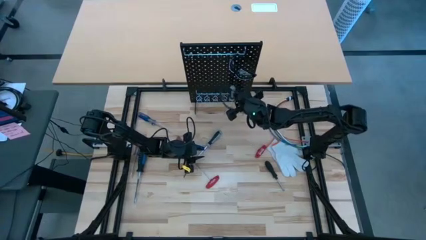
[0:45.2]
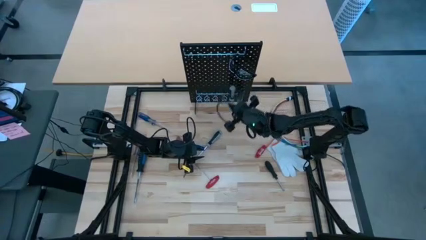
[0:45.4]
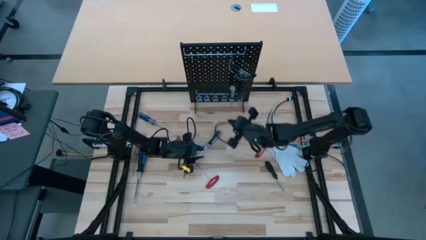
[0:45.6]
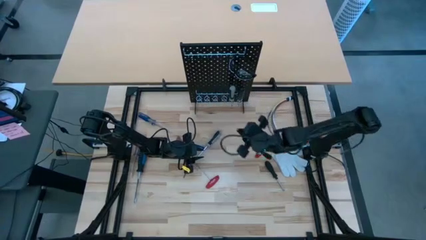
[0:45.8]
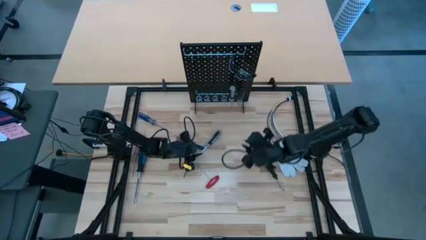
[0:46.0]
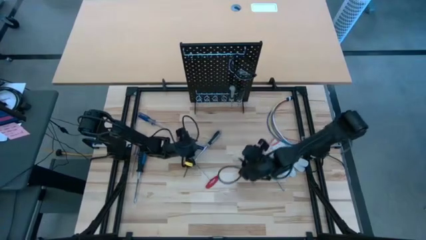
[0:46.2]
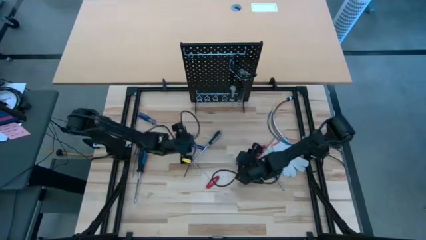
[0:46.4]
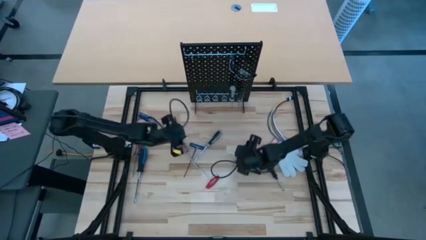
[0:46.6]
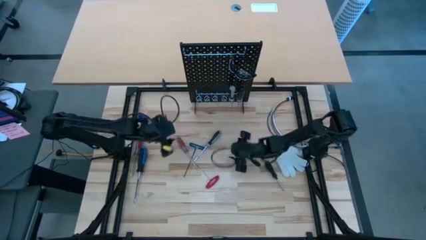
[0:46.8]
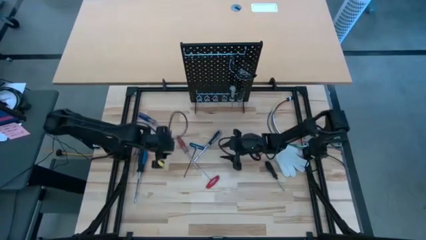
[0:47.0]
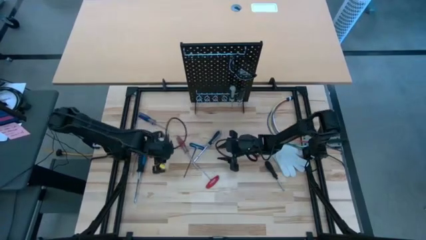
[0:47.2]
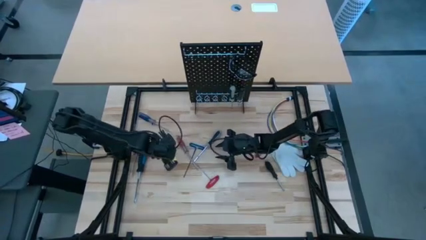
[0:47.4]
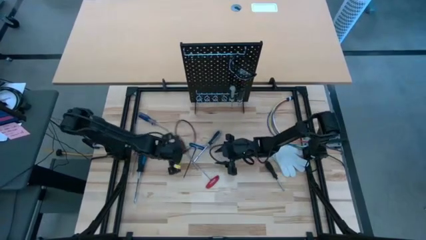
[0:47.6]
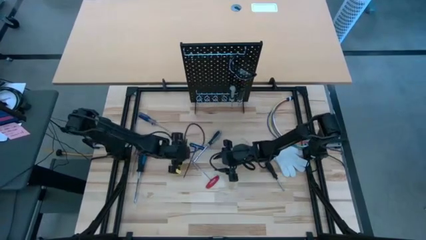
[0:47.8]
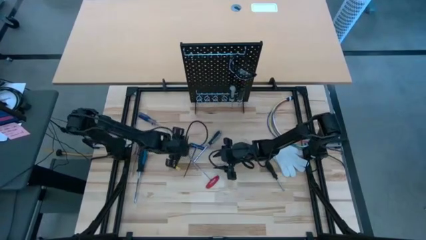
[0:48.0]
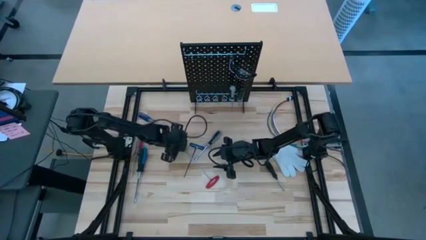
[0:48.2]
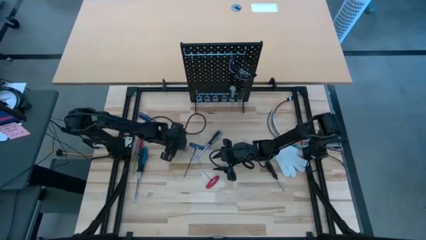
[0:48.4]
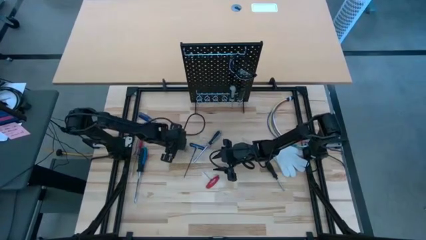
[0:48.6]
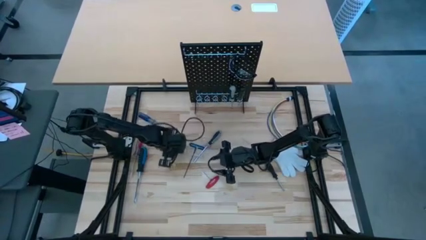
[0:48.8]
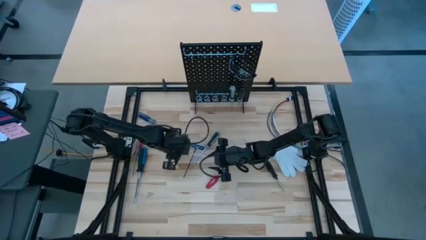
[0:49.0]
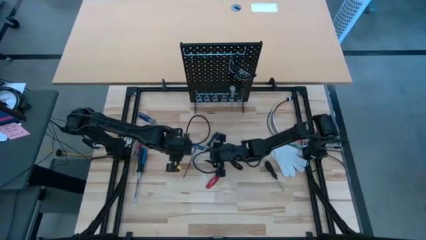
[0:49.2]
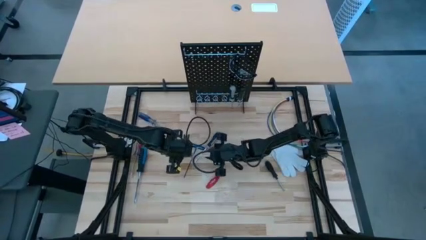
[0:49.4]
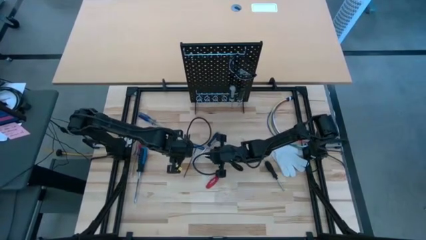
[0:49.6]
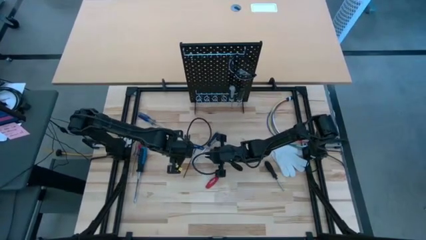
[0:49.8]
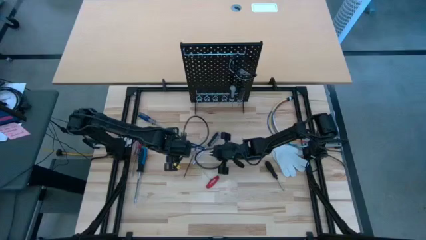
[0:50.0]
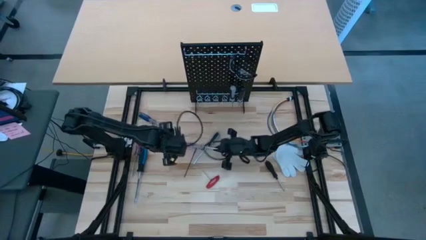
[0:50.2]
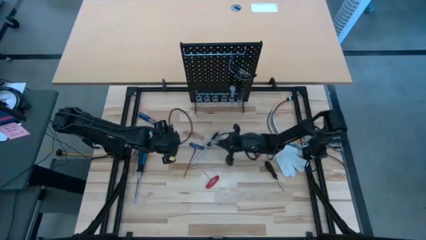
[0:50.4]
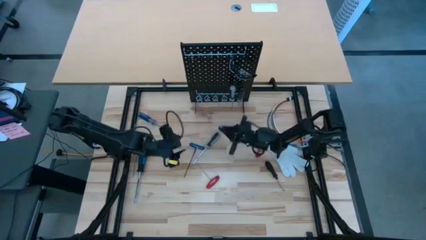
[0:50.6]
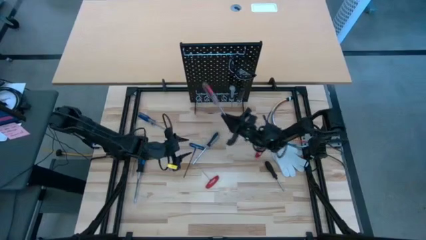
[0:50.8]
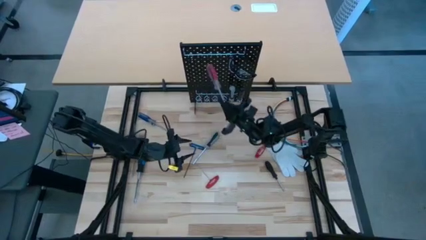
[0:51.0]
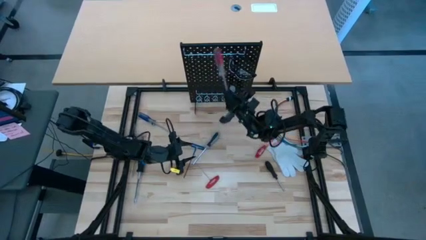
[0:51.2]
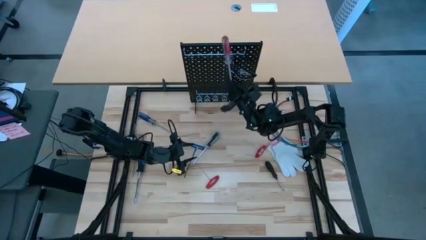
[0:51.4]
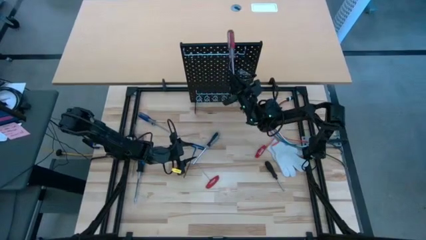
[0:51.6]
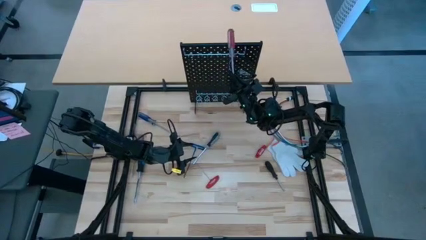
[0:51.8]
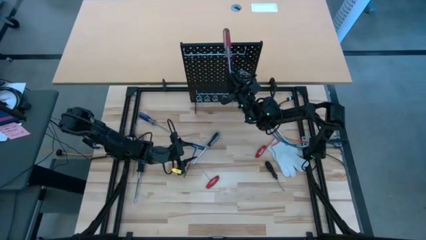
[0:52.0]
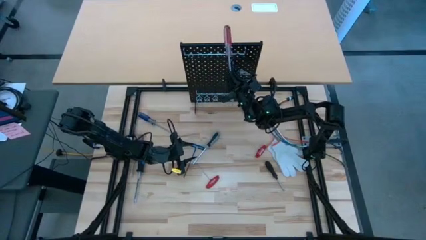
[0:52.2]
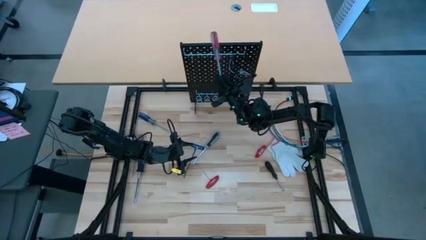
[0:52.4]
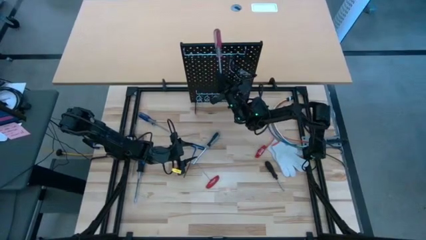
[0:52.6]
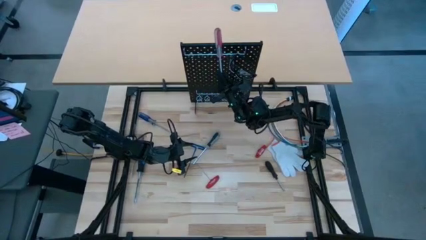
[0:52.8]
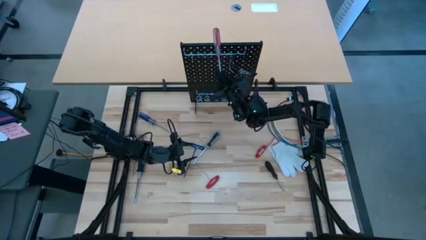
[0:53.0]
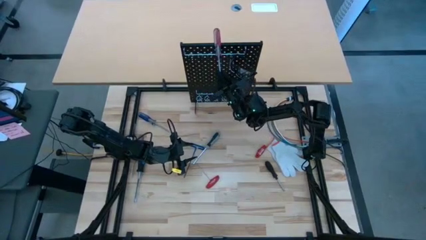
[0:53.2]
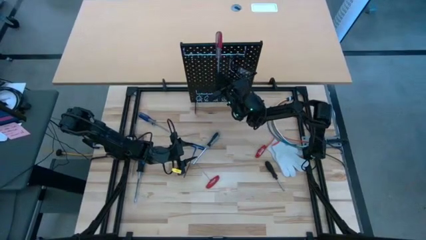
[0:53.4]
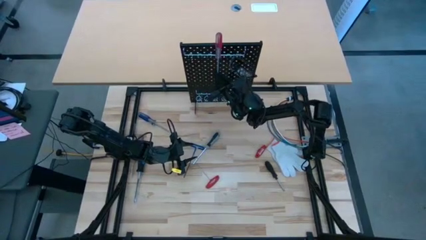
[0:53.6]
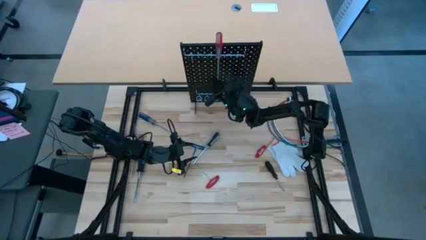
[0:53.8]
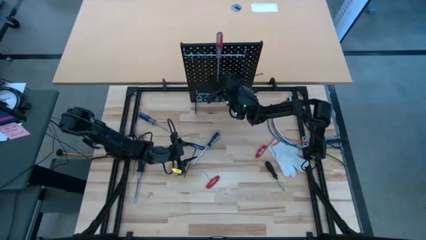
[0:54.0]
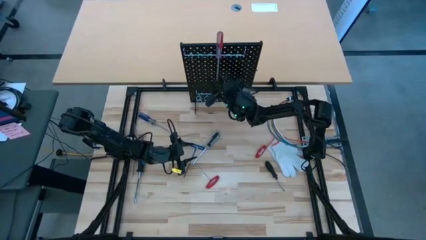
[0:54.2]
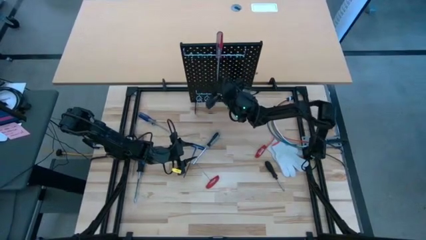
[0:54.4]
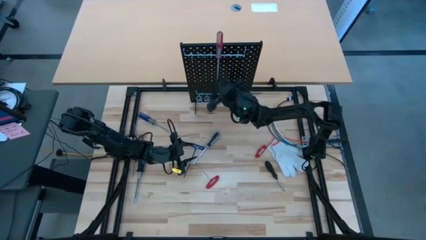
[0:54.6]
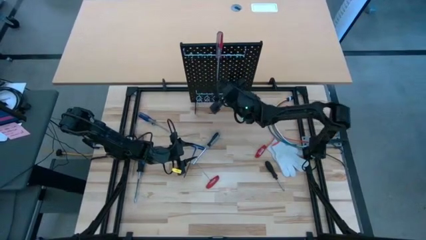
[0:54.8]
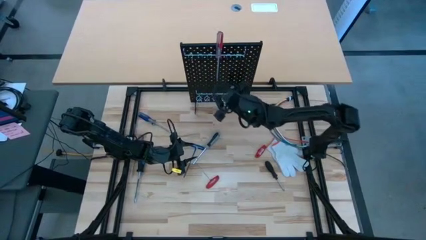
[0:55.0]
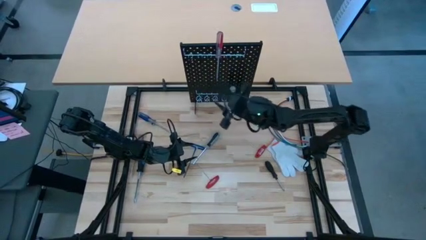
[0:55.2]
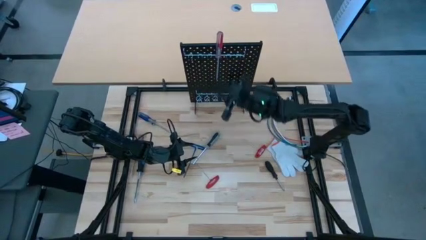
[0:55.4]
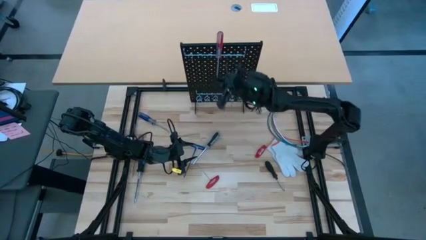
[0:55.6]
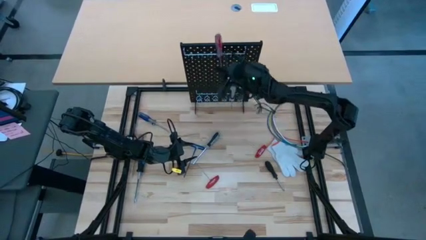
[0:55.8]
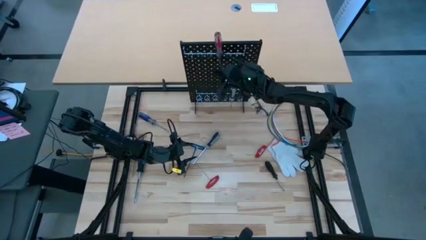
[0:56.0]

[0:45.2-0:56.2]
Task: Hang tools onto peg board
Hang the right transparent red screwdriver on the pegboard

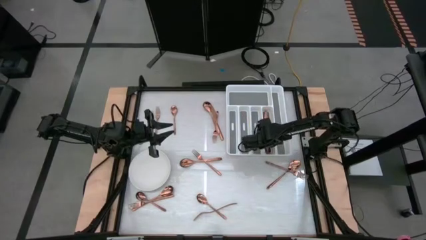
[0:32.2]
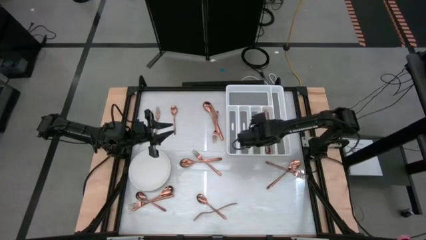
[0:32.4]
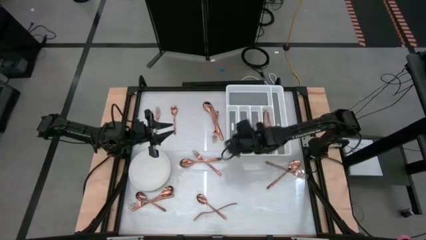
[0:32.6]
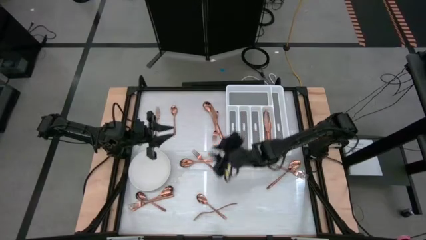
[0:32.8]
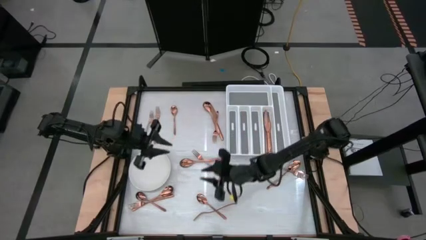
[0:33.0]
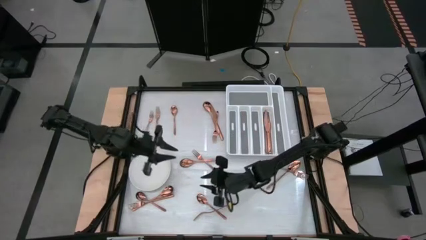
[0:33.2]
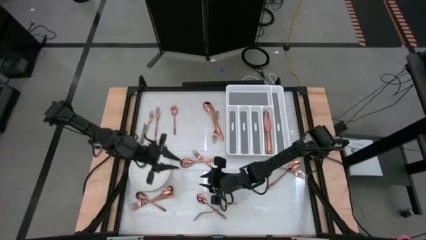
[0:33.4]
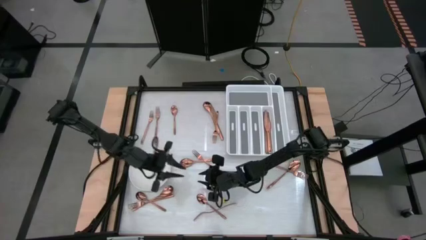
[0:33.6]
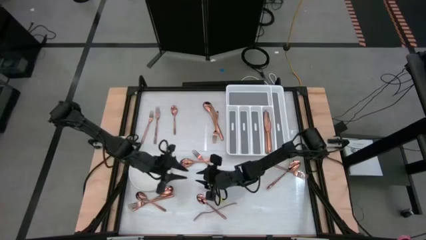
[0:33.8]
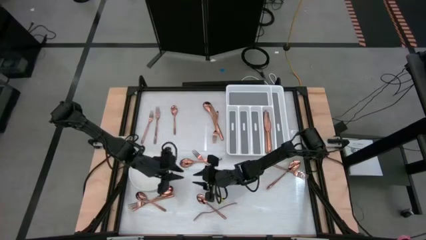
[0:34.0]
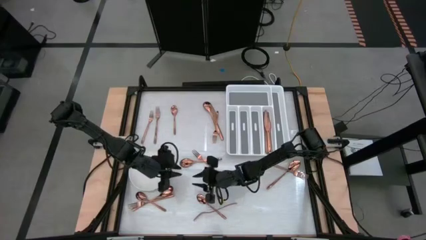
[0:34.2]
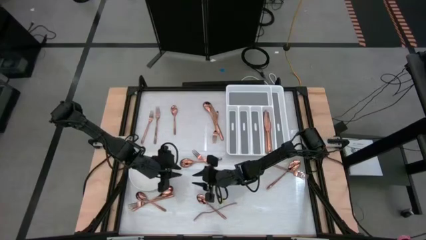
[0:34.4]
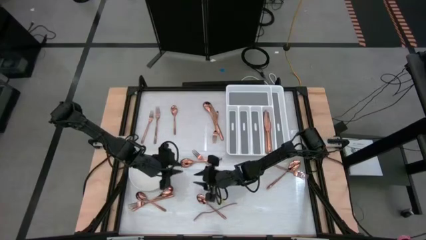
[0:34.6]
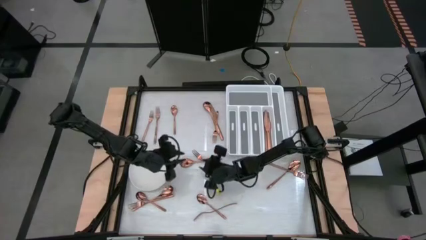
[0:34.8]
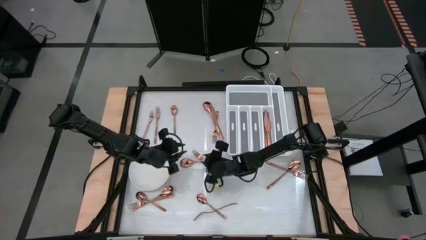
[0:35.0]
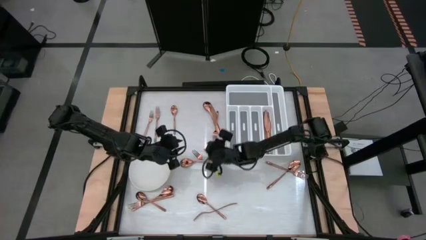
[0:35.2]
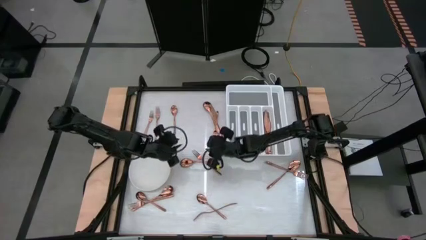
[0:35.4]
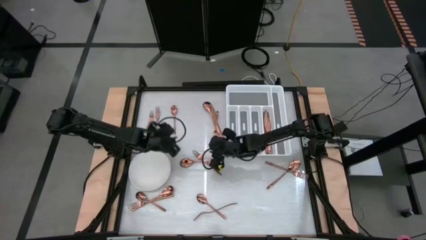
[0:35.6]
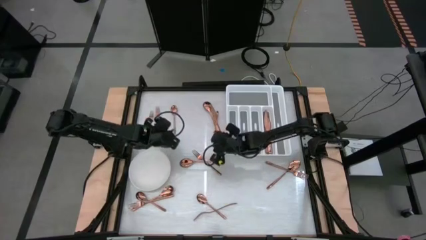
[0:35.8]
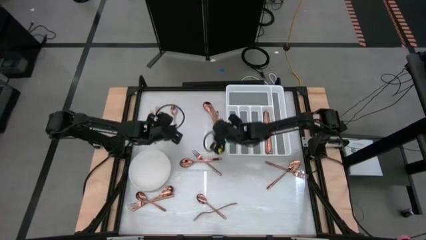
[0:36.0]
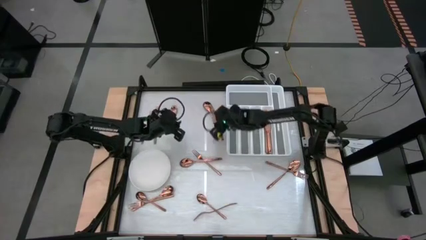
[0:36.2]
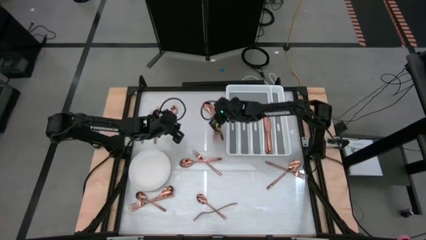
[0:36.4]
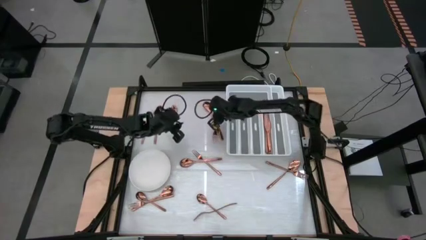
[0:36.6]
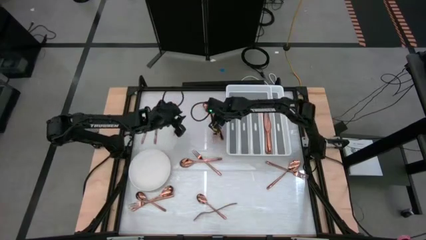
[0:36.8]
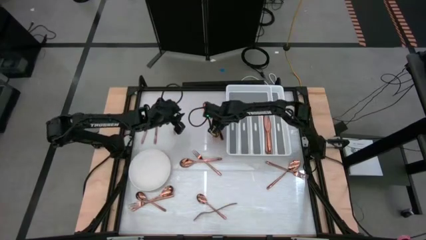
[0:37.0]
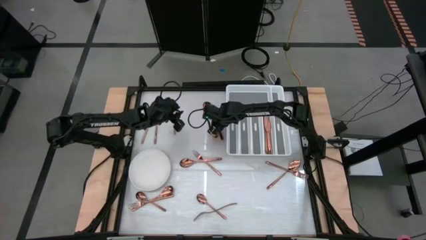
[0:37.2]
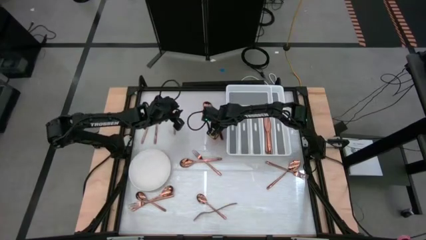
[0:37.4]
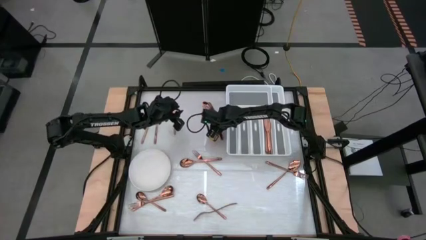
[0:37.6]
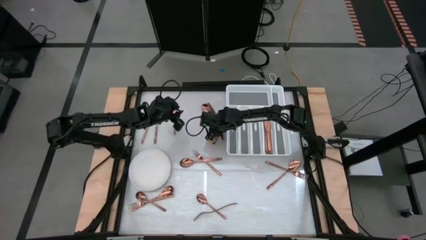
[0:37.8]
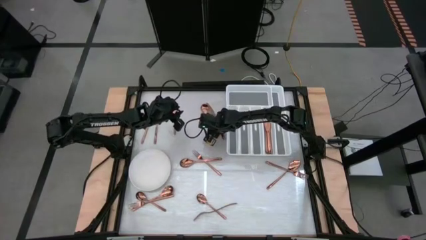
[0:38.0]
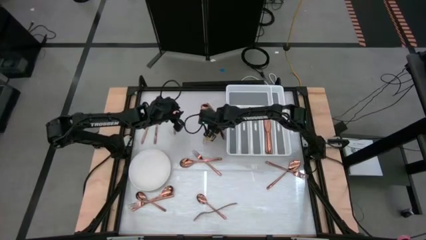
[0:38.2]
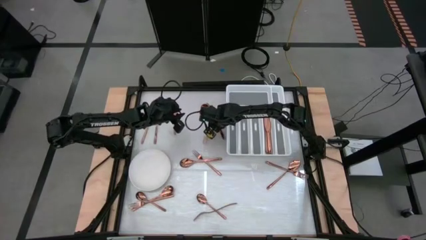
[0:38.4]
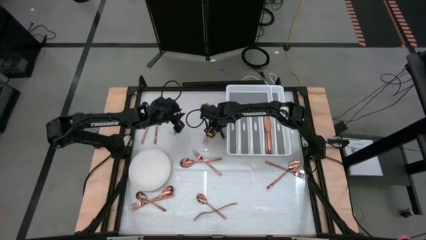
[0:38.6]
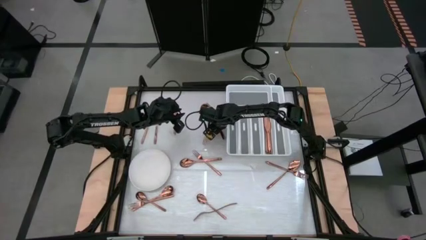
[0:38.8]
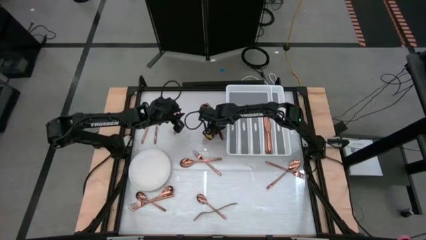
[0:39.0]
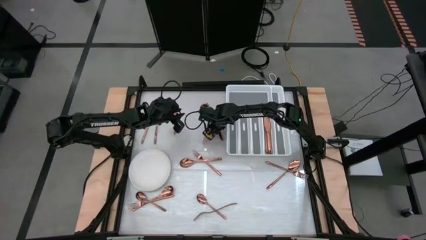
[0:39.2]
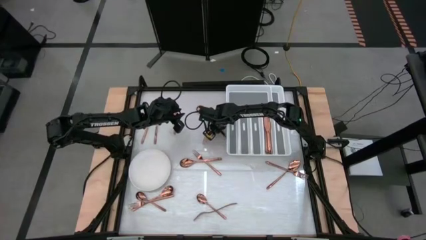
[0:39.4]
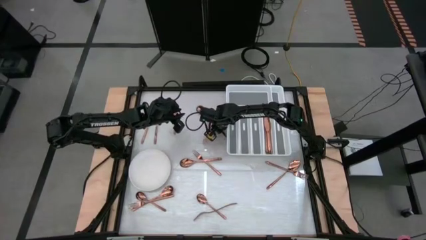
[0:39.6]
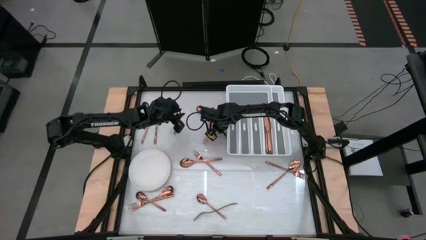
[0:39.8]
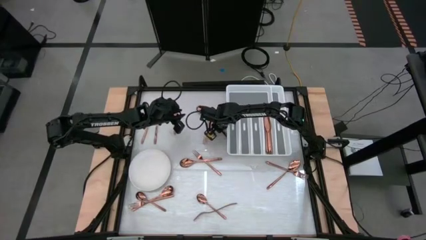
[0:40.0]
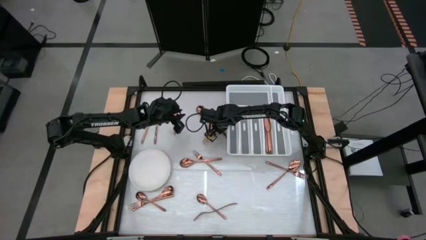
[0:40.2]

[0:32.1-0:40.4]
Task: Sort silverware
Put the bronze knife into the silverware tray
